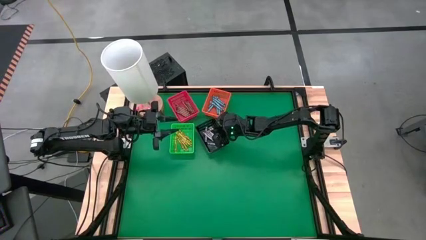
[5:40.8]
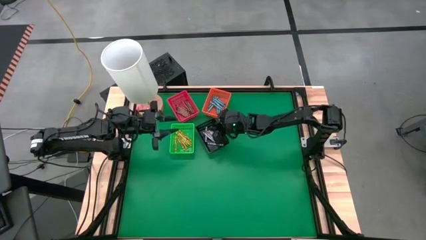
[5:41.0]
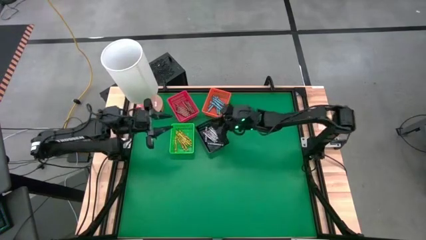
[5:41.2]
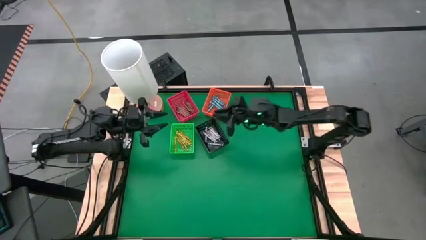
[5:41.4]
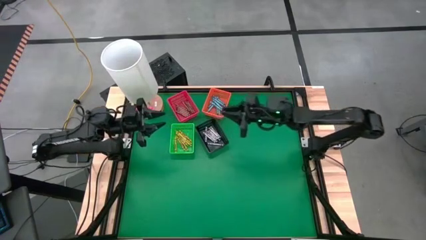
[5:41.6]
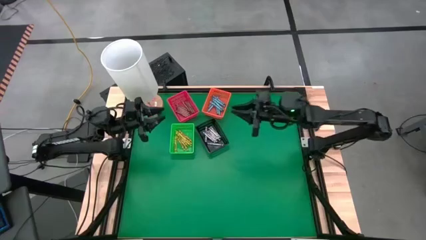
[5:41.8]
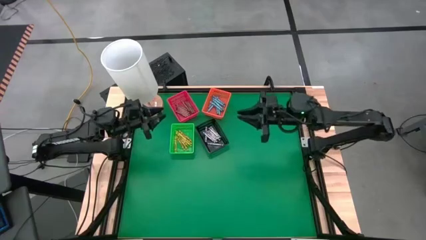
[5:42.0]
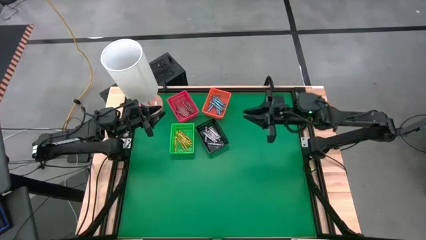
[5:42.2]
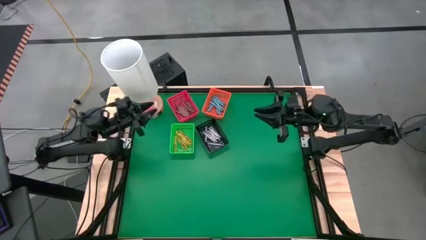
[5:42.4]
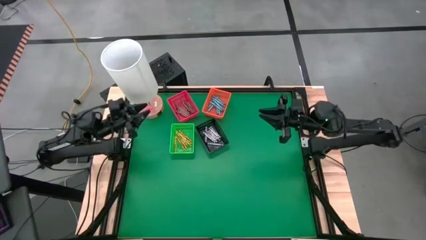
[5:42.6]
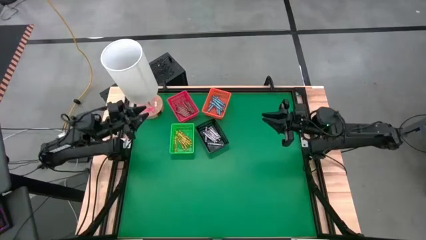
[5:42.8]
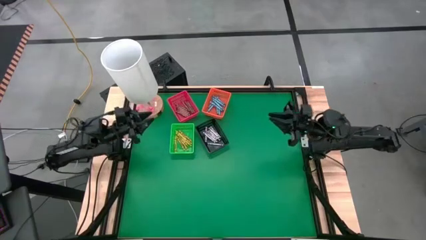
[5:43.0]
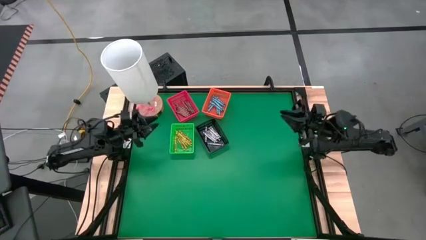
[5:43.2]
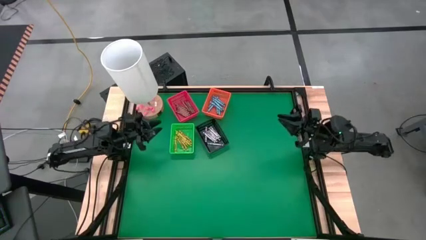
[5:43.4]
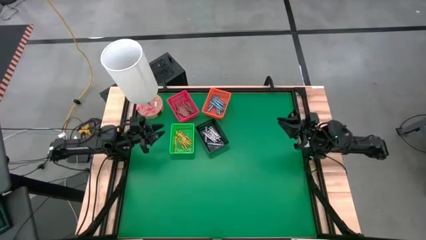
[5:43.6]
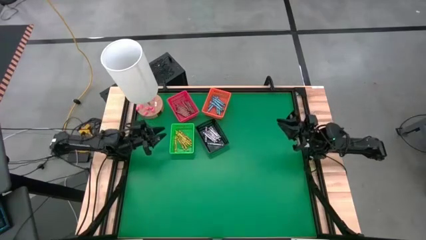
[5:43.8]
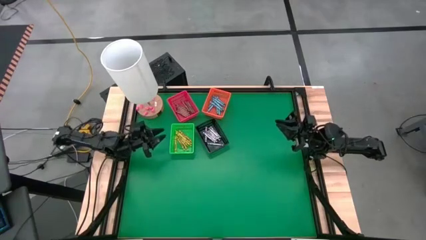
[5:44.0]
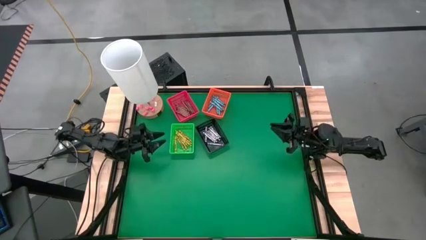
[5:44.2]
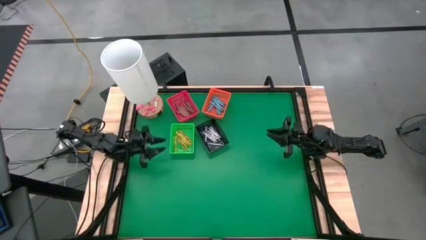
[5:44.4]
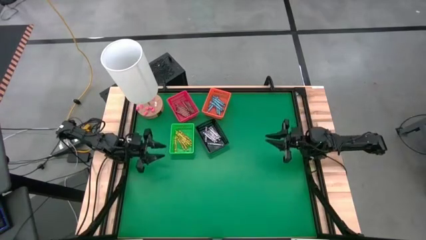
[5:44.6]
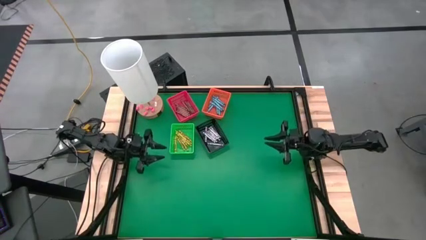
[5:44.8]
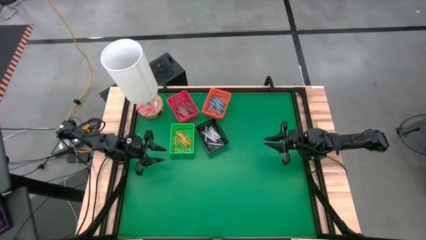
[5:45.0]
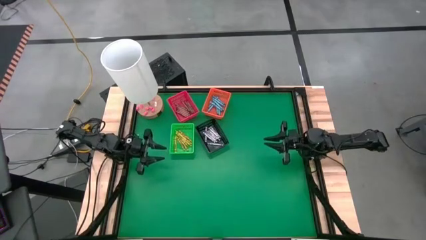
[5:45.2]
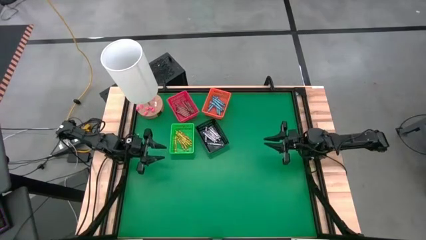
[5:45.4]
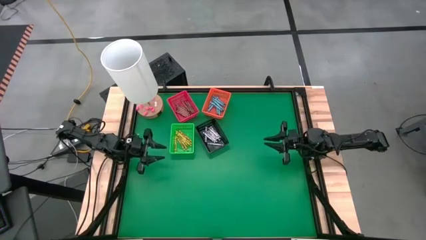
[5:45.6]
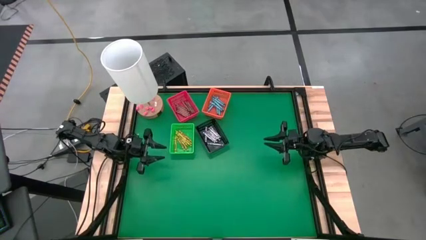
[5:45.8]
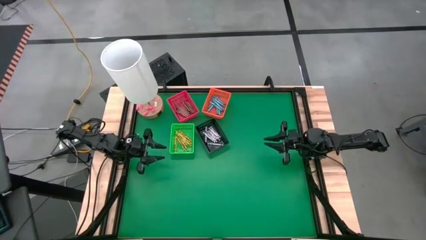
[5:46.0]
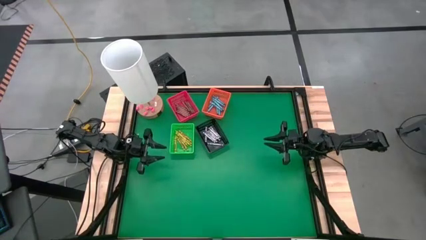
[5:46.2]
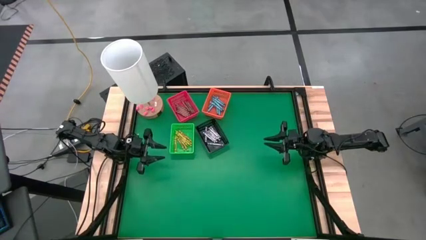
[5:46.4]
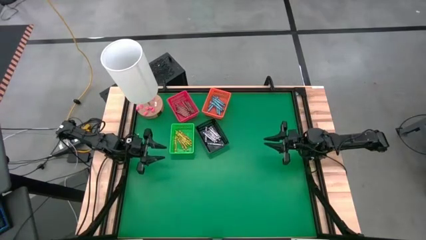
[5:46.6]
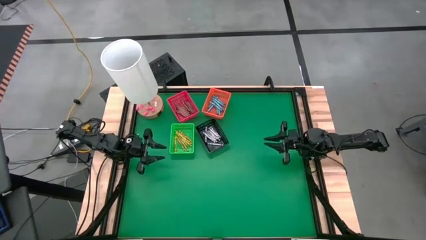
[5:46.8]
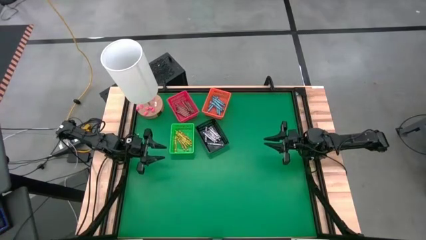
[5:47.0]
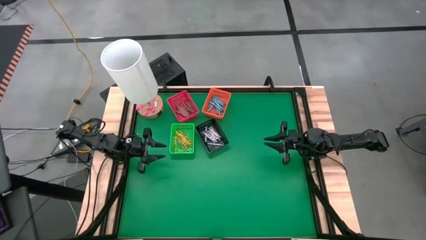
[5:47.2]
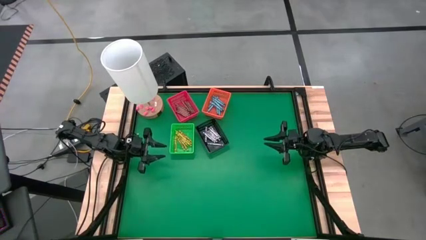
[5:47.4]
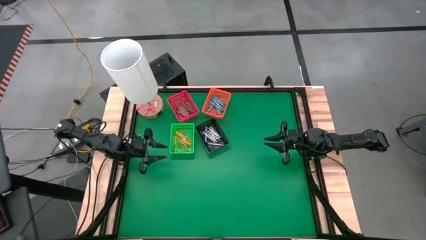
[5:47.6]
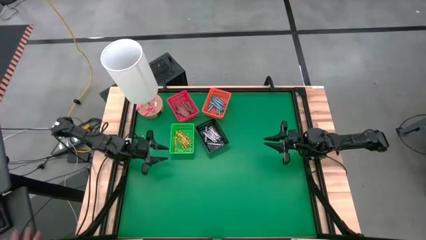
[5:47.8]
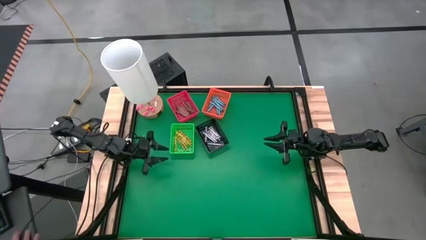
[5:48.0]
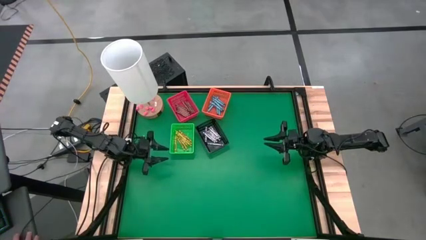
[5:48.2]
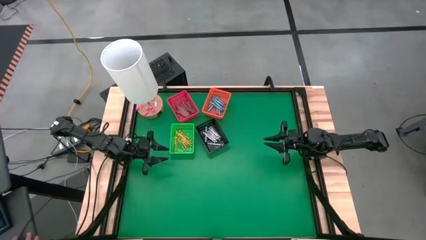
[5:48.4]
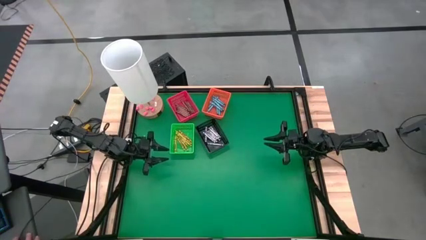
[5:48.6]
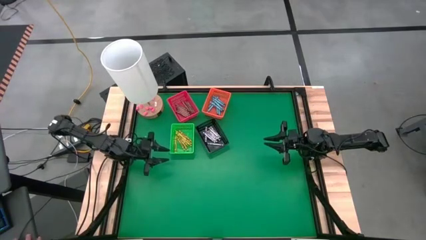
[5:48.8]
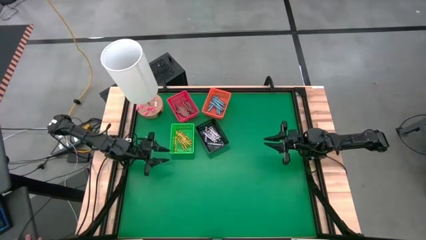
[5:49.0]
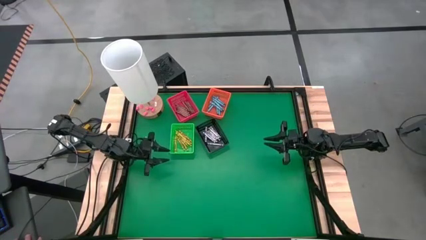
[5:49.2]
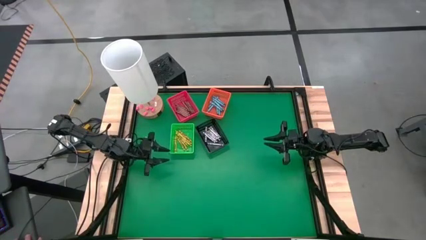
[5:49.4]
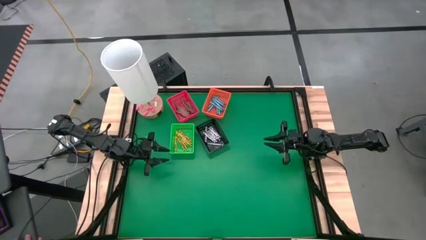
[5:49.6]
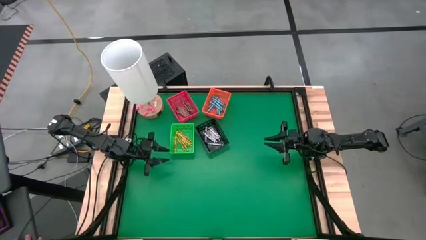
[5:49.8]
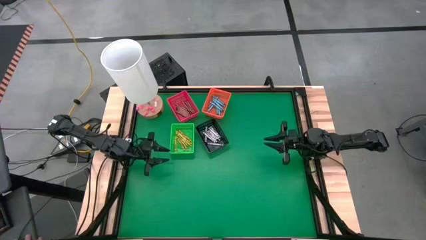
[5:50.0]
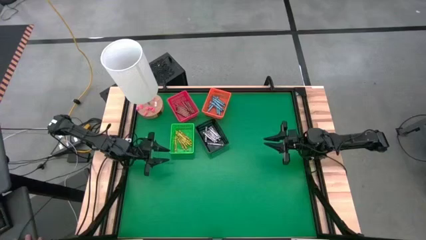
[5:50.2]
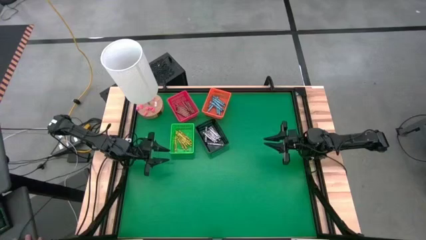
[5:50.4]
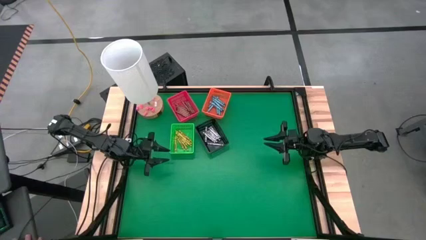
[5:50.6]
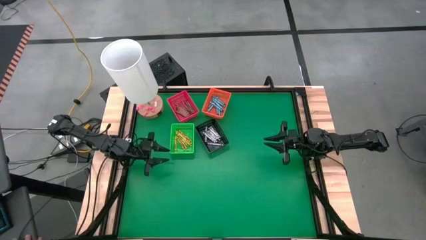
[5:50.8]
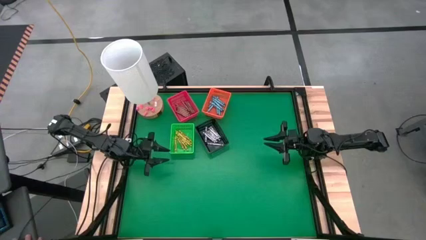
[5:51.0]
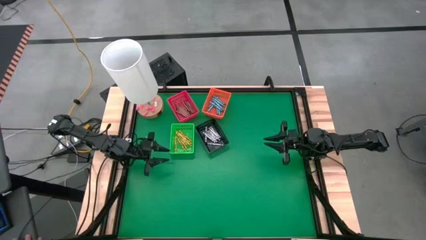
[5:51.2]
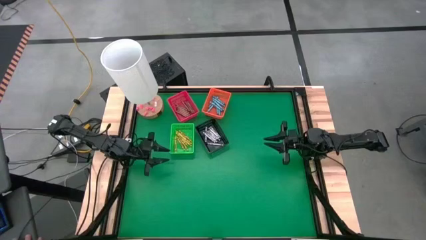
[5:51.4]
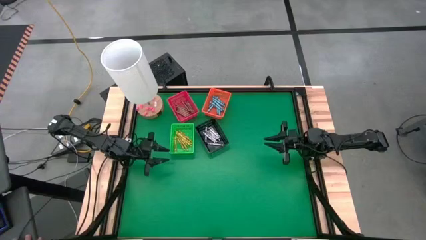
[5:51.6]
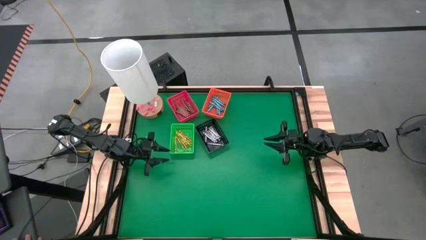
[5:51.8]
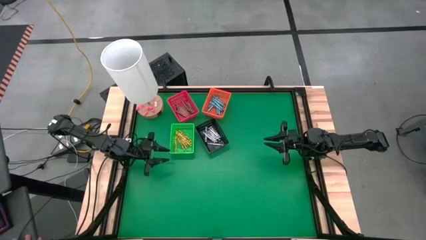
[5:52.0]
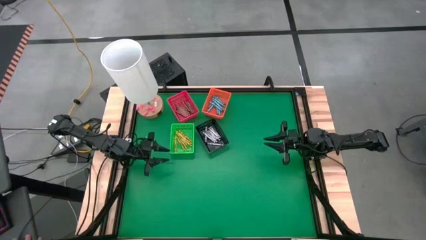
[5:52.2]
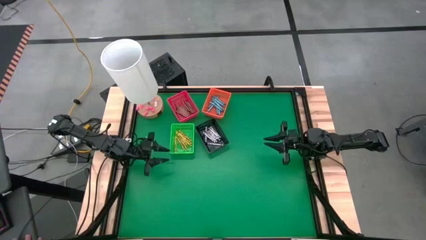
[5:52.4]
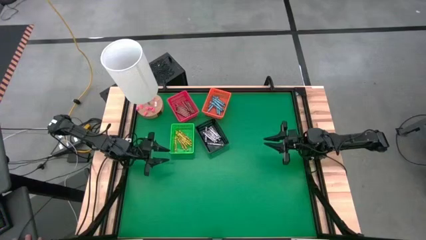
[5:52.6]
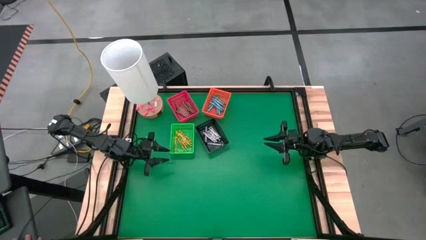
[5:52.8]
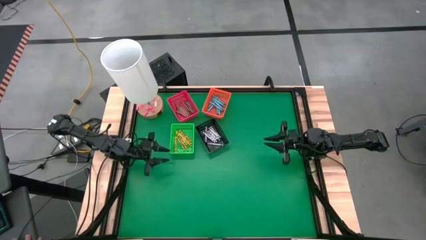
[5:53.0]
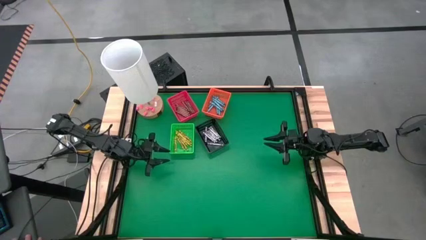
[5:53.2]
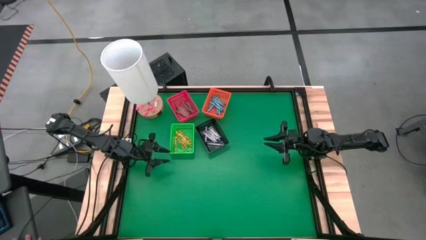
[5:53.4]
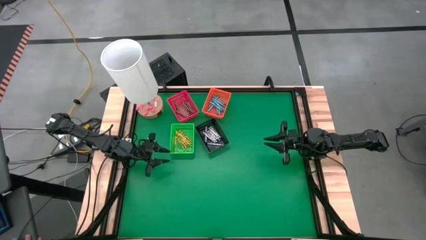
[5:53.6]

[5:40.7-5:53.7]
Task: Sort crayons
Return to Home Position
